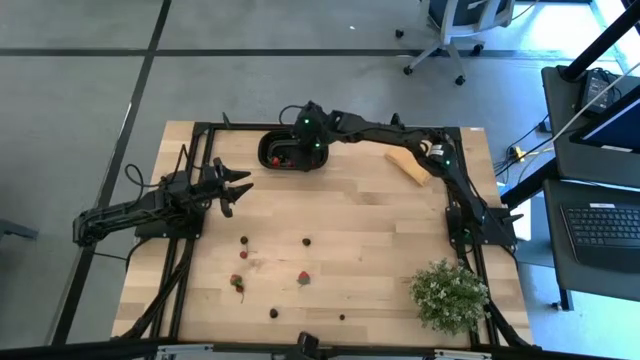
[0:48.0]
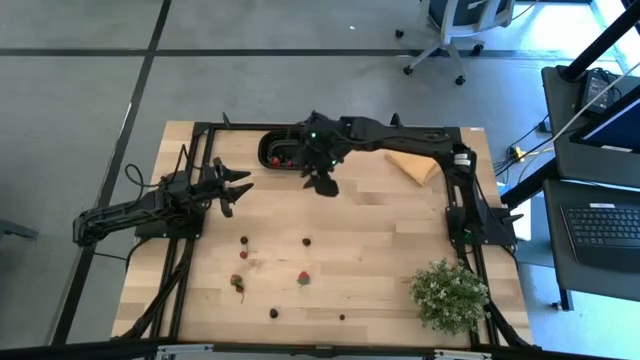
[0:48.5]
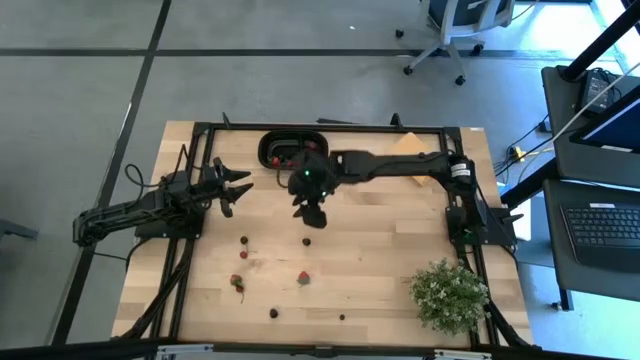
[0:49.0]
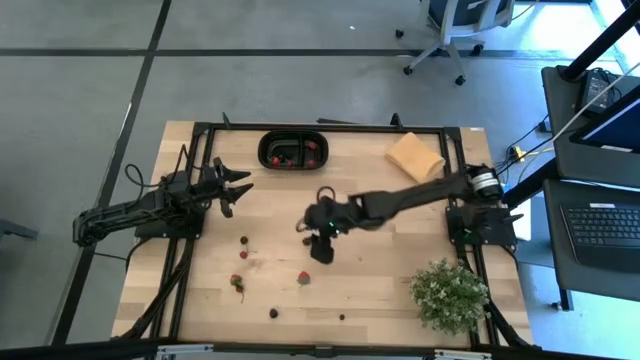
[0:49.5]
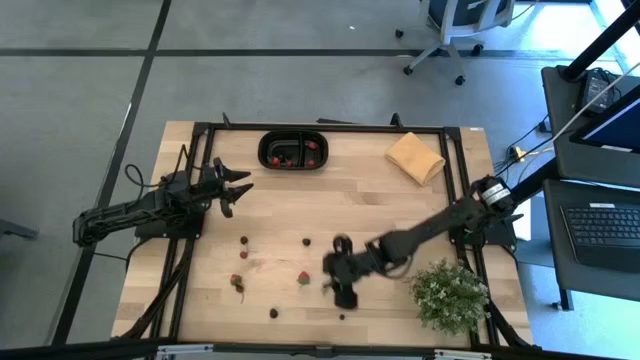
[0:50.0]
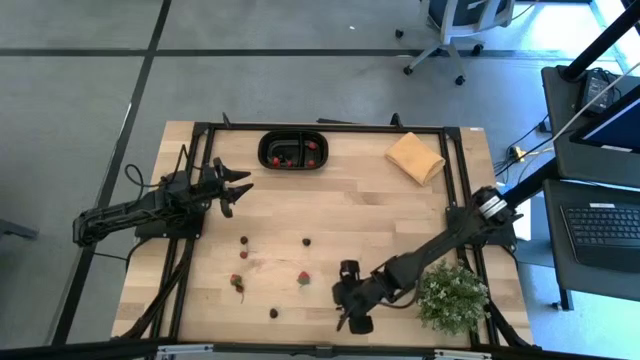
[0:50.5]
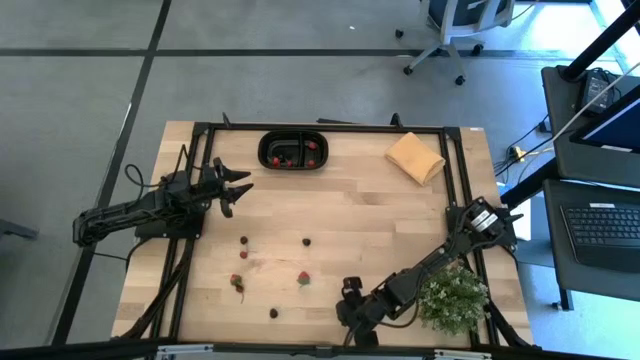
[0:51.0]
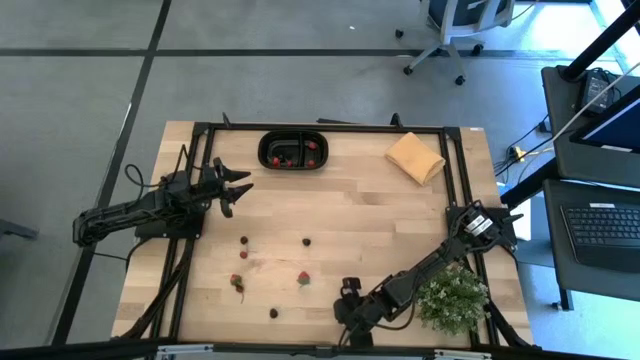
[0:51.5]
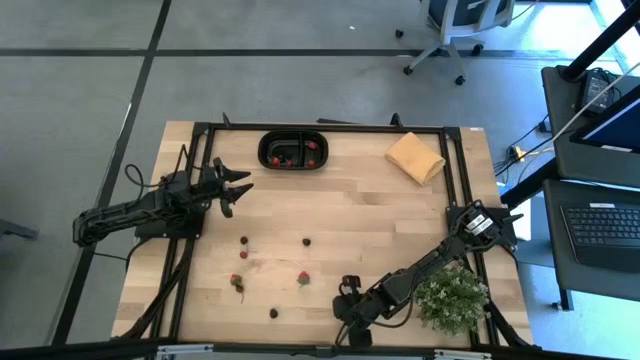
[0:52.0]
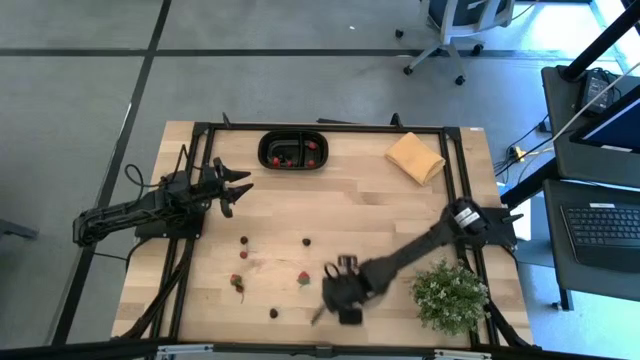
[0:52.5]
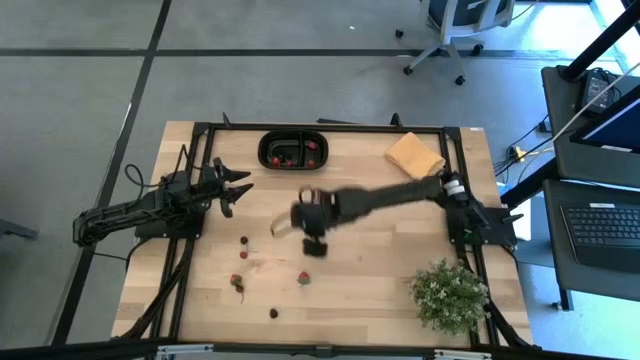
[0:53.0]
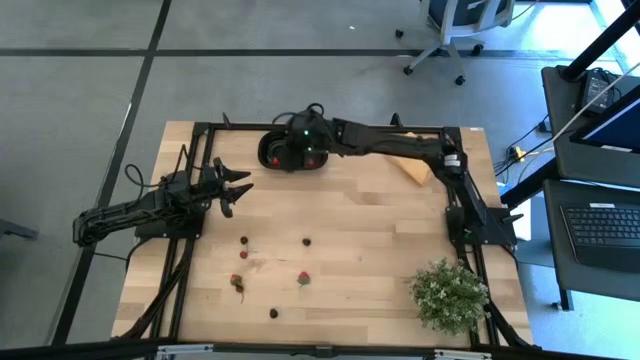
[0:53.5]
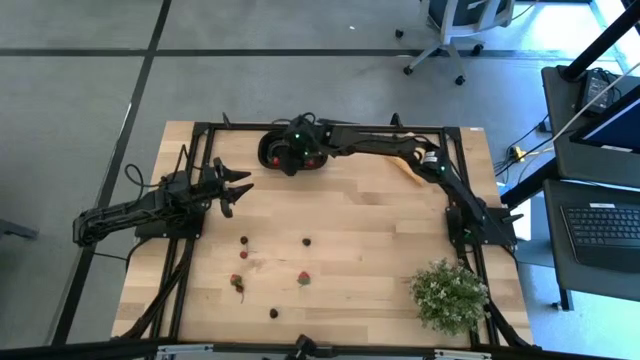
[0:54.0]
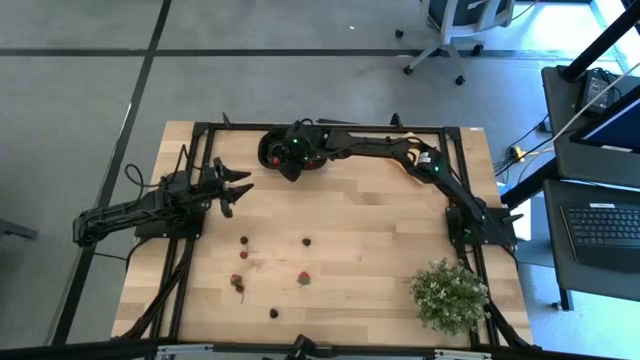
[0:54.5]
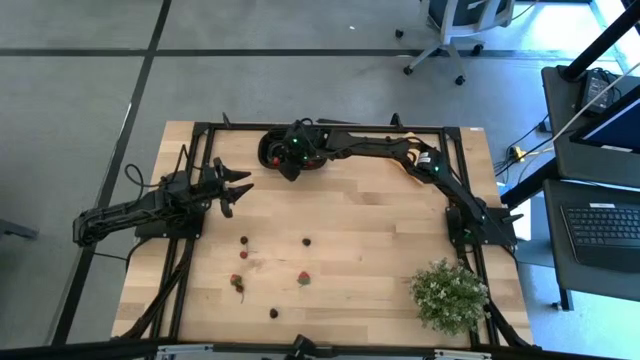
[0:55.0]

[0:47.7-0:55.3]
Task: Pick and placing Produce into tupperware
Put the blueberry into the black bin

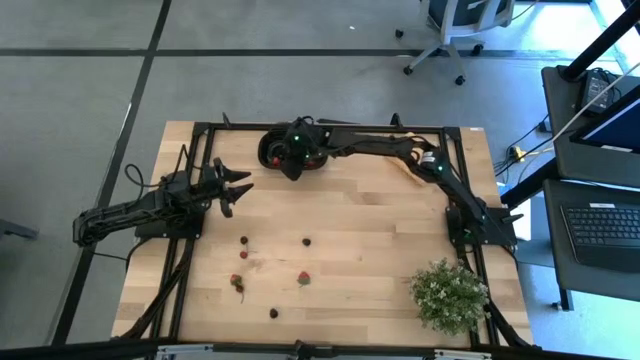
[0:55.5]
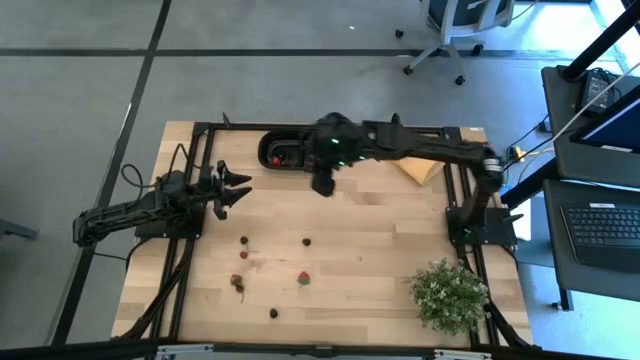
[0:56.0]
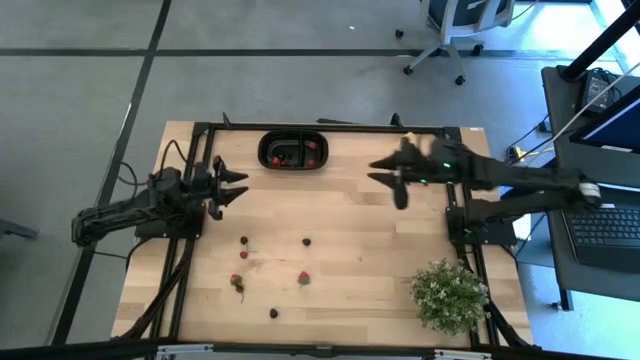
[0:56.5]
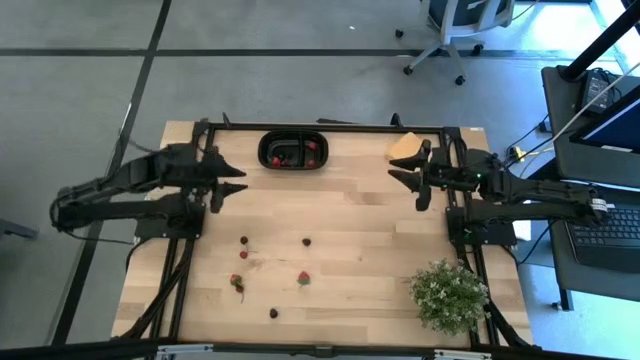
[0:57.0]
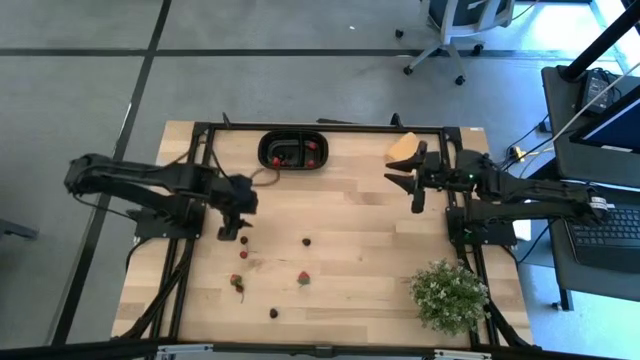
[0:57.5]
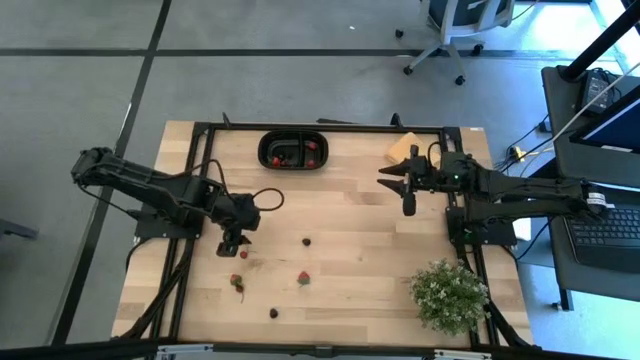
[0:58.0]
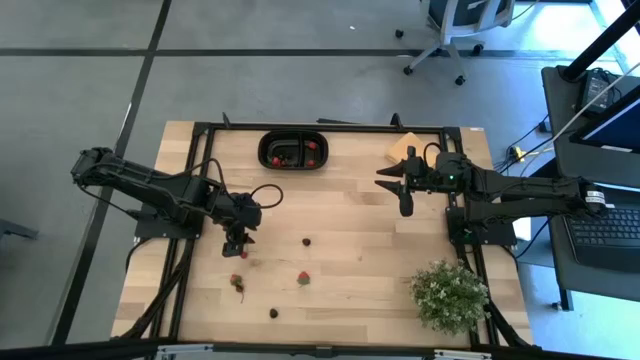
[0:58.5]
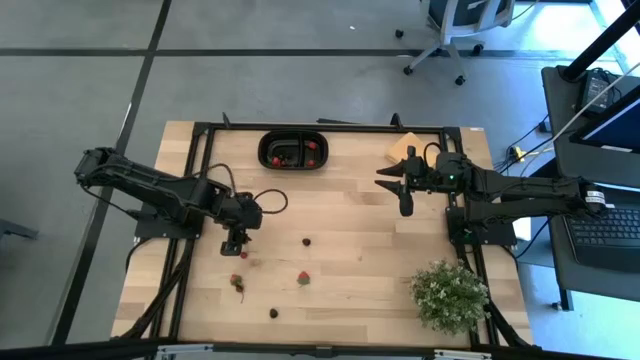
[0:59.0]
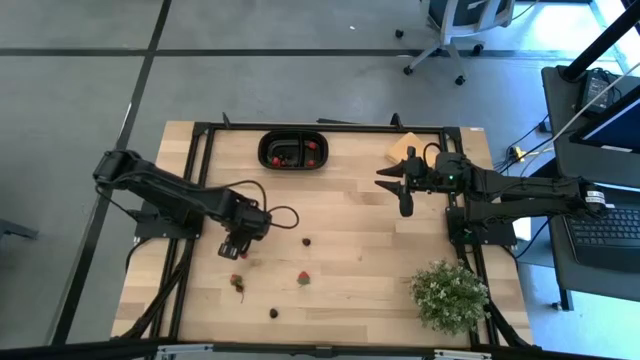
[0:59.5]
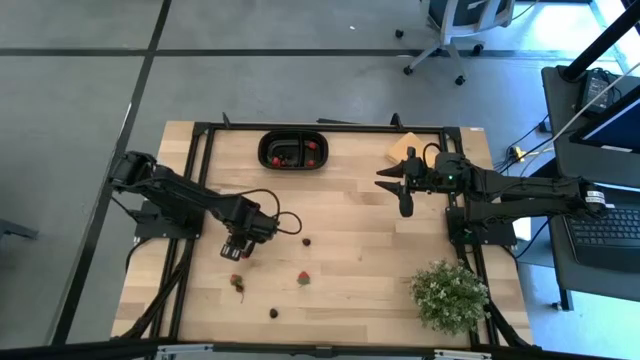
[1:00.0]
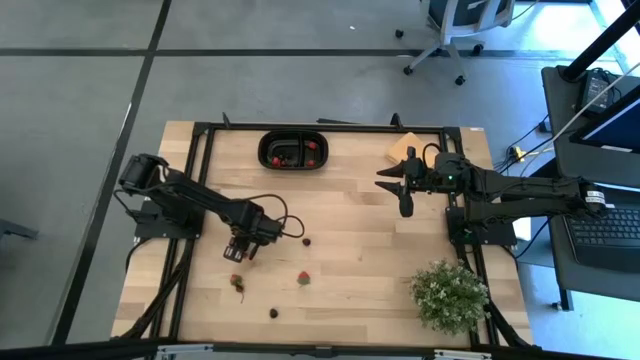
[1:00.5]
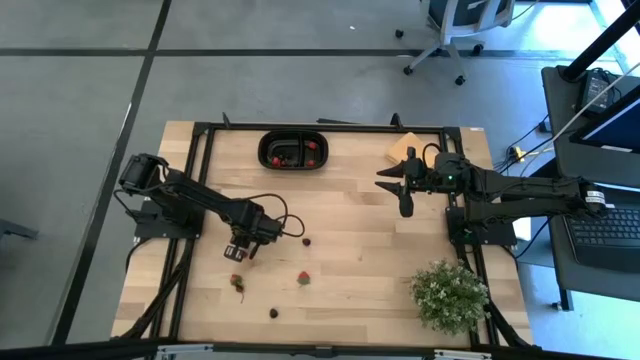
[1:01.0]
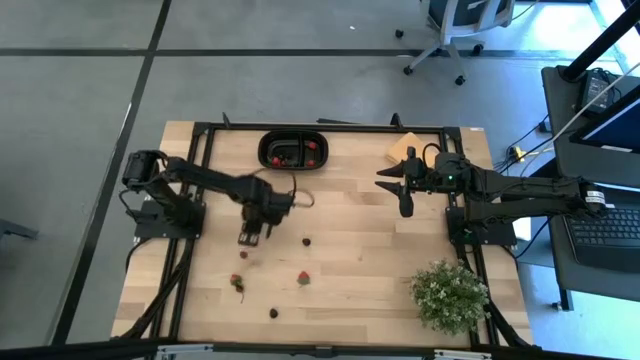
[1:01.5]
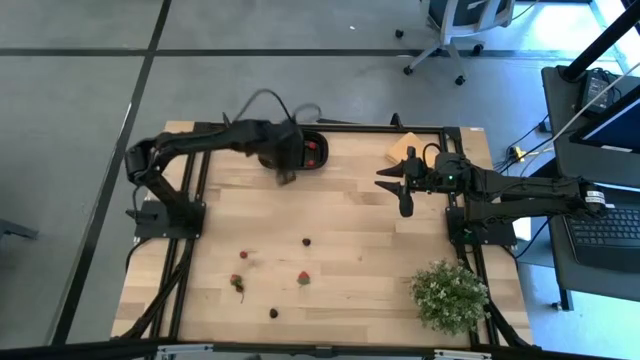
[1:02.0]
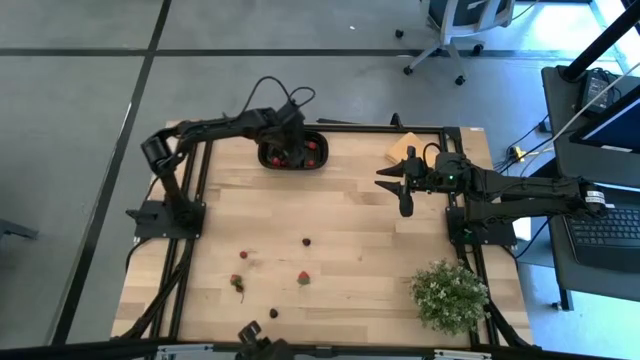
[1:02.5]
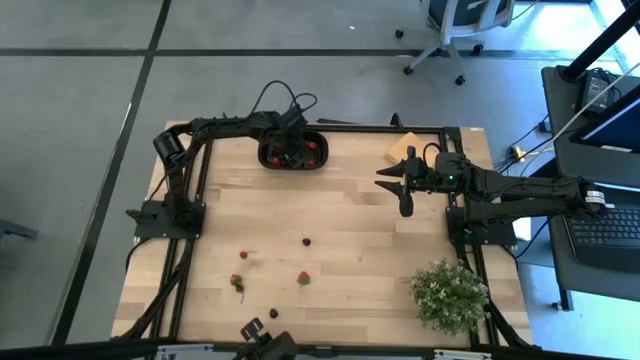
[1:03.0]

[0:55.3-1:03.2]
Put the black cherry into the black bin

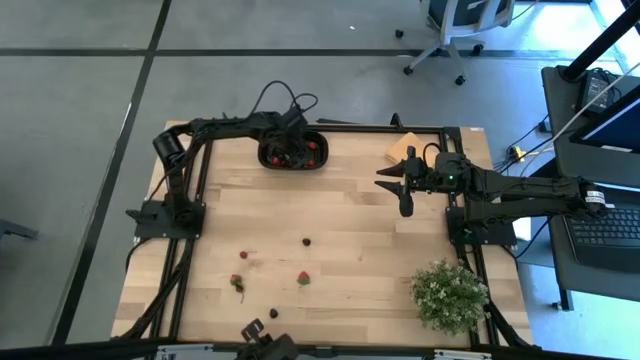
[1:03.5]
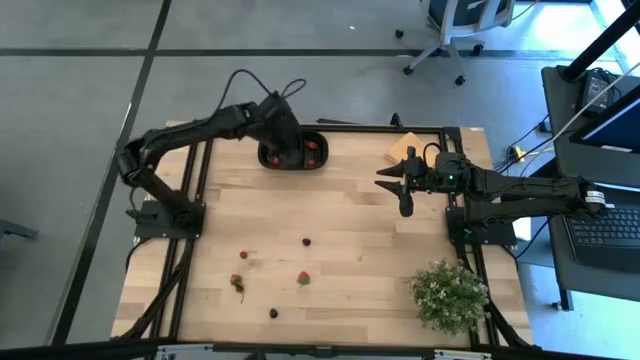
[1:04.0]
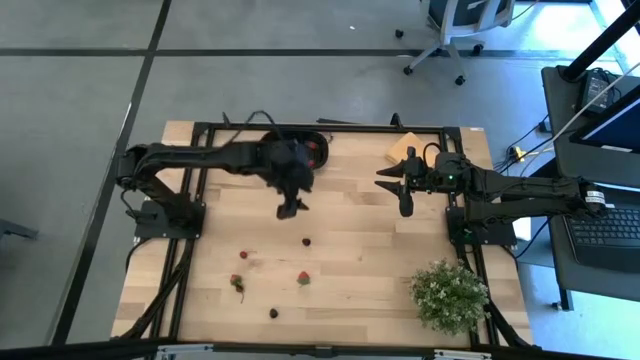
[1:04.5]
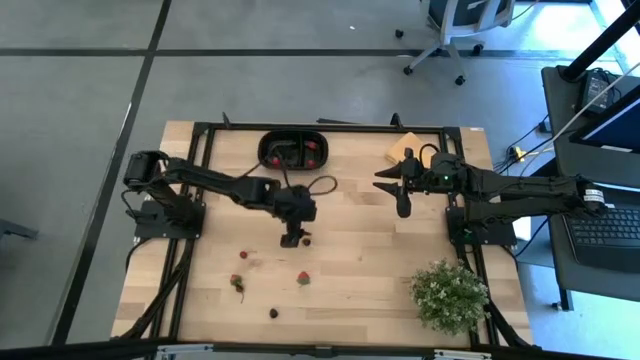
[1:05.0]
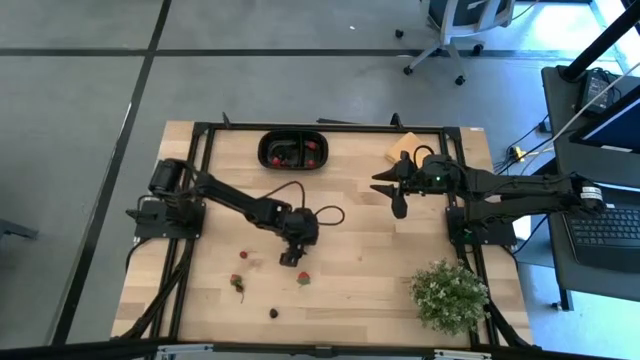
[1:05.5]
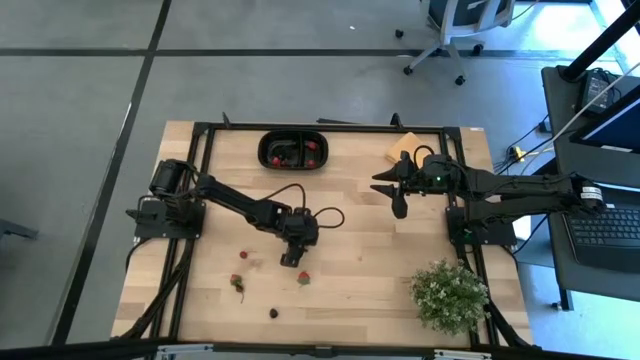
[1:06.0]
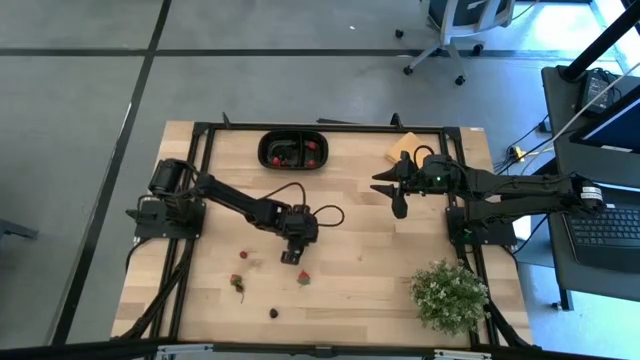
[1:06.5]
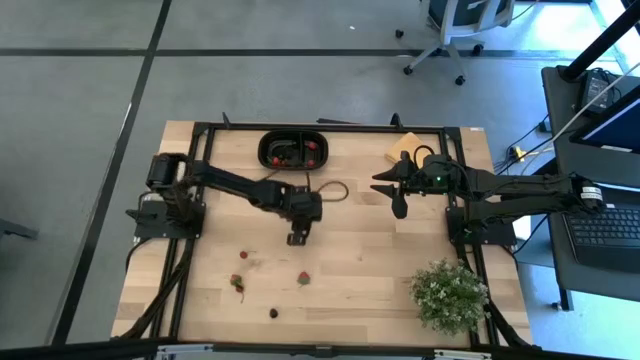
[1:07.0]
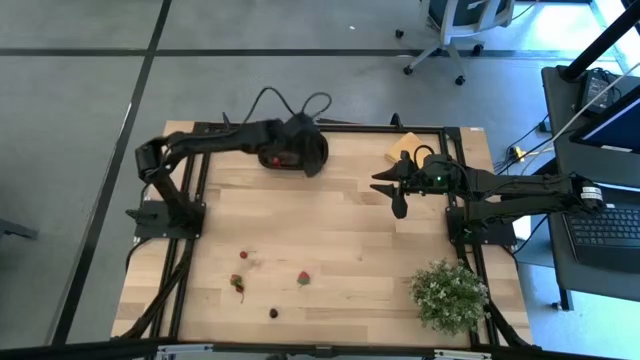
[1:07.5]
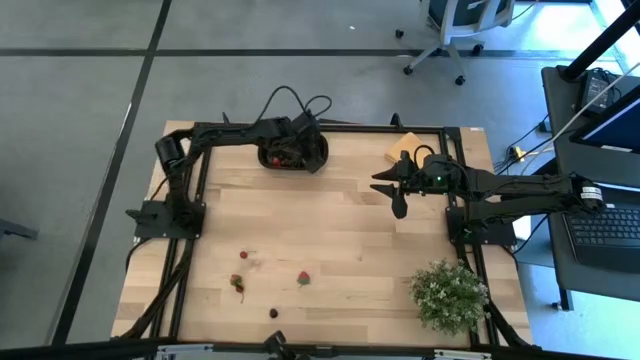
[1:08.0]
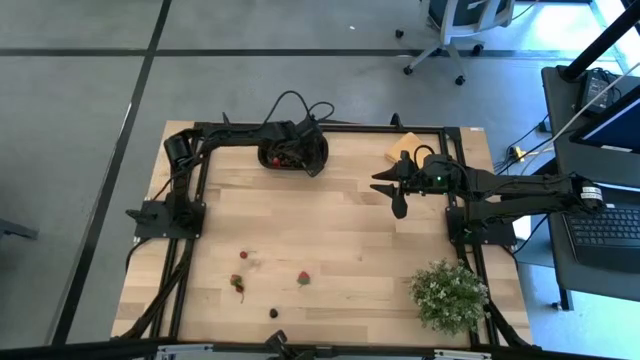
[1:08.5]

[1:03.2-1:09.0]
Put the top blackberry into the black bin
